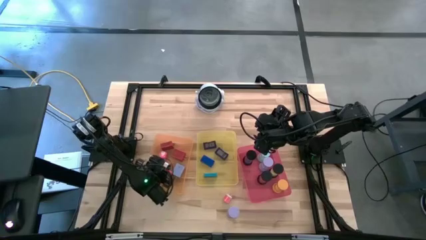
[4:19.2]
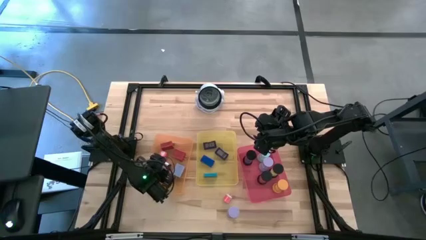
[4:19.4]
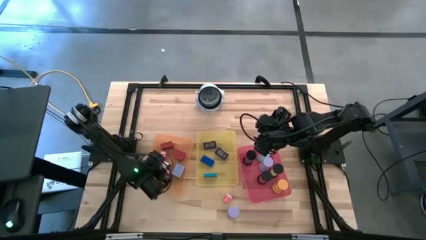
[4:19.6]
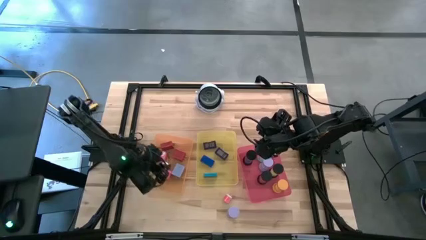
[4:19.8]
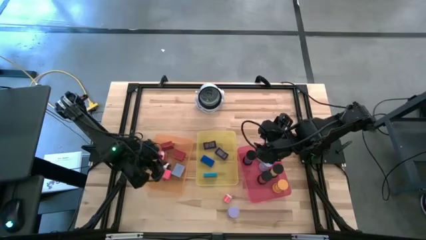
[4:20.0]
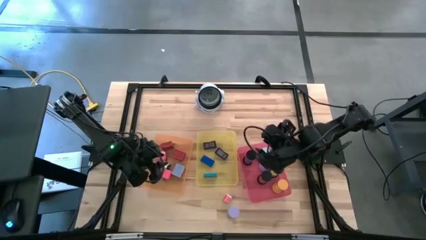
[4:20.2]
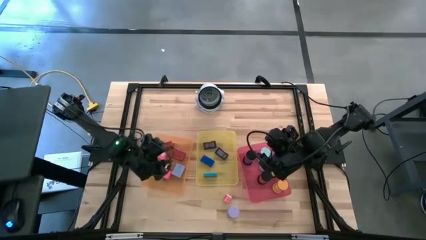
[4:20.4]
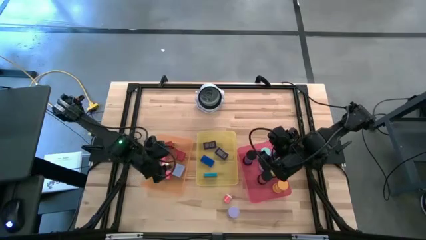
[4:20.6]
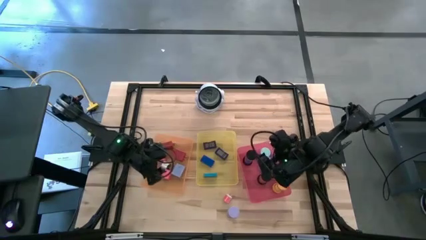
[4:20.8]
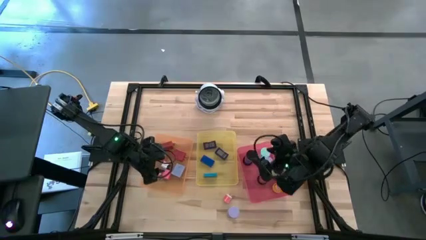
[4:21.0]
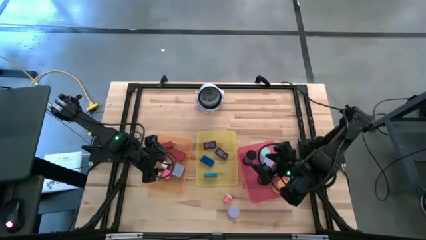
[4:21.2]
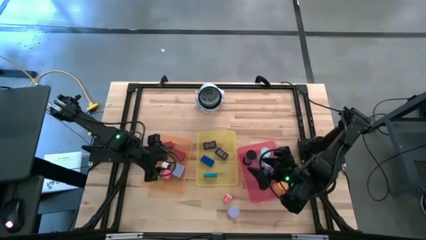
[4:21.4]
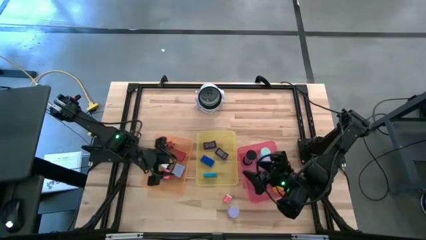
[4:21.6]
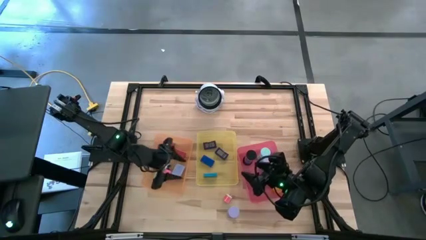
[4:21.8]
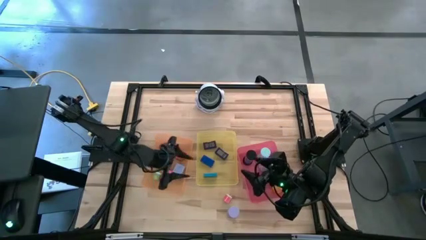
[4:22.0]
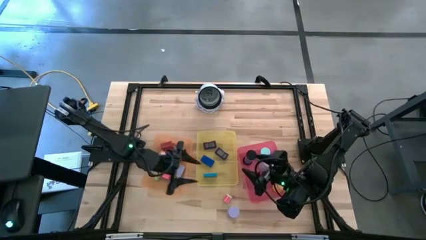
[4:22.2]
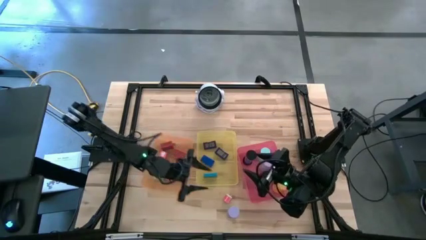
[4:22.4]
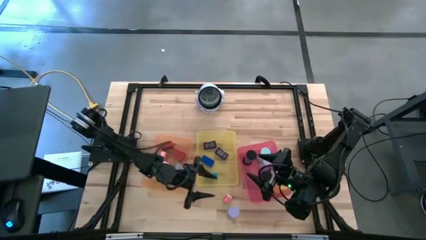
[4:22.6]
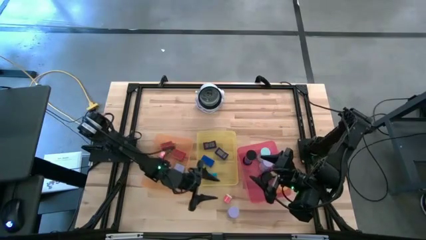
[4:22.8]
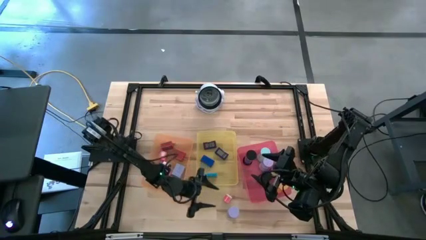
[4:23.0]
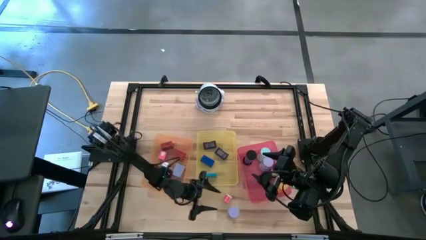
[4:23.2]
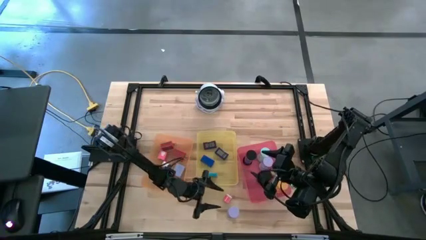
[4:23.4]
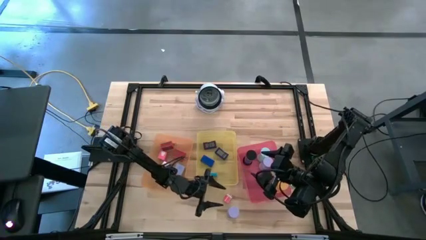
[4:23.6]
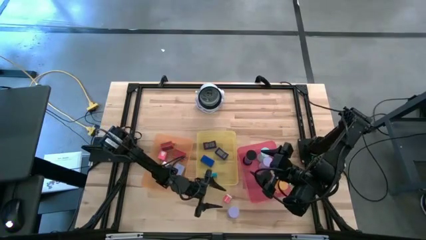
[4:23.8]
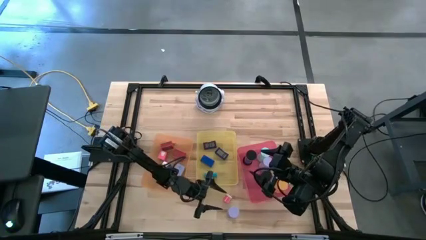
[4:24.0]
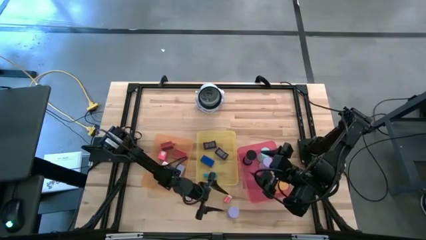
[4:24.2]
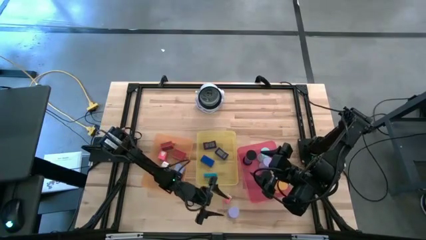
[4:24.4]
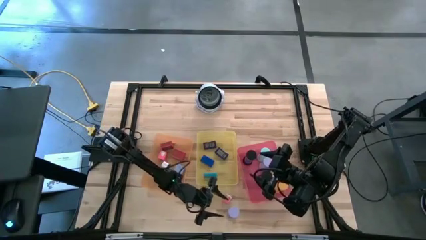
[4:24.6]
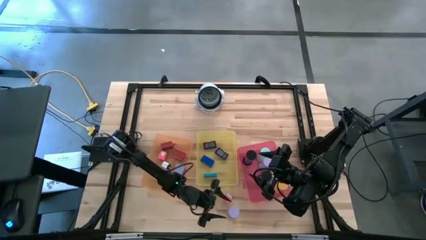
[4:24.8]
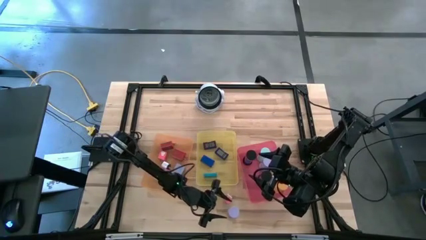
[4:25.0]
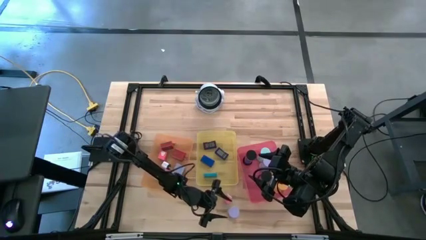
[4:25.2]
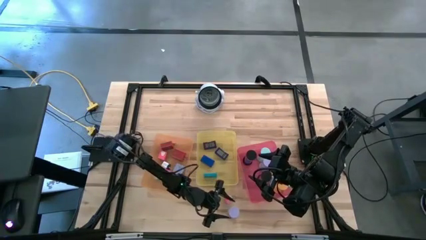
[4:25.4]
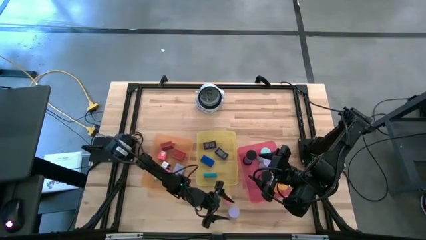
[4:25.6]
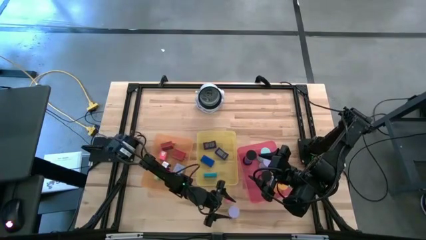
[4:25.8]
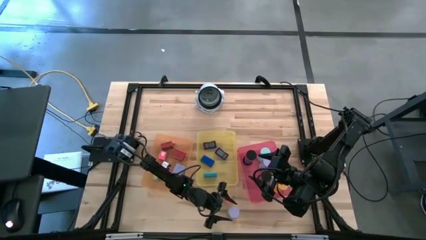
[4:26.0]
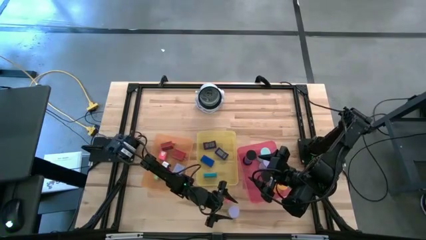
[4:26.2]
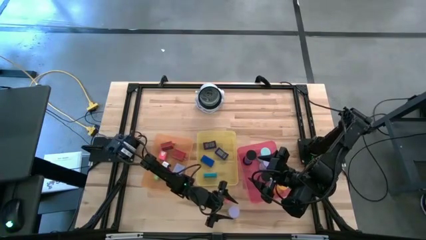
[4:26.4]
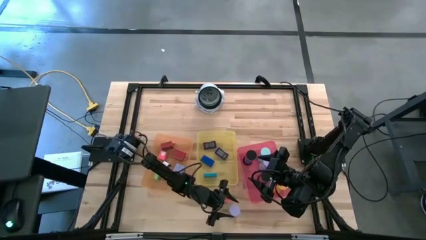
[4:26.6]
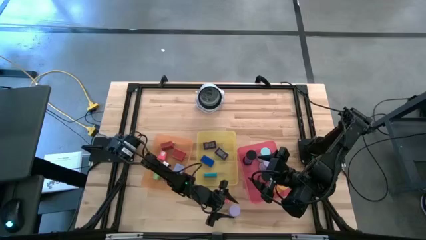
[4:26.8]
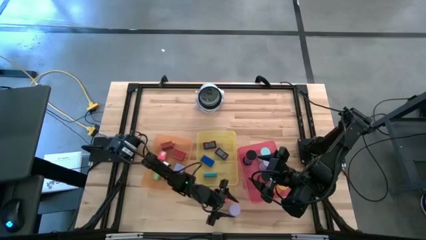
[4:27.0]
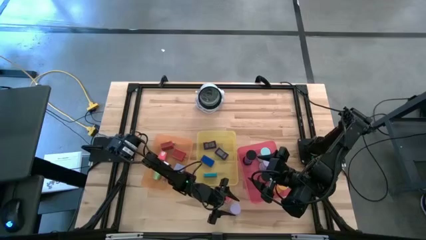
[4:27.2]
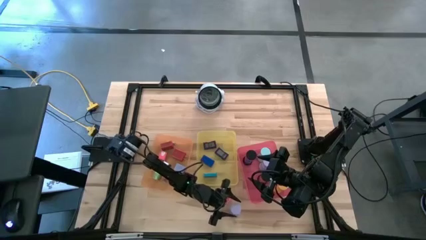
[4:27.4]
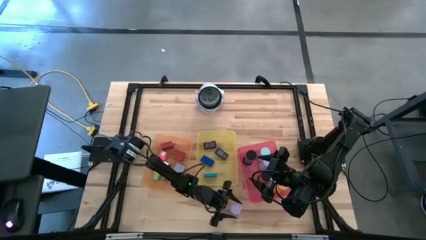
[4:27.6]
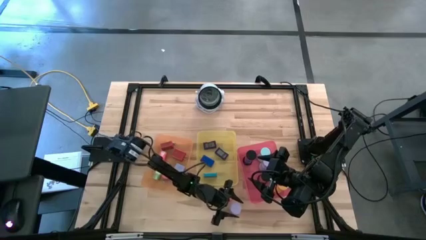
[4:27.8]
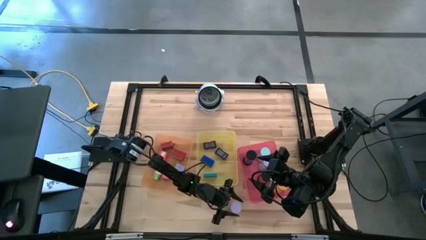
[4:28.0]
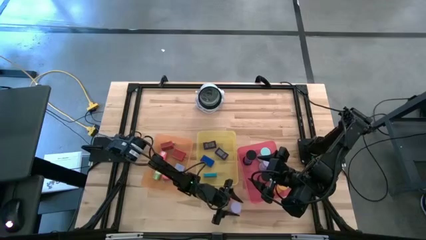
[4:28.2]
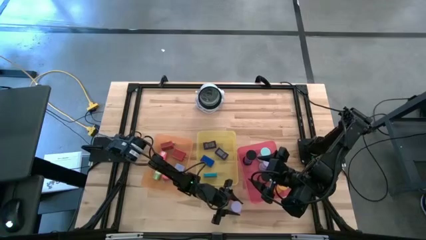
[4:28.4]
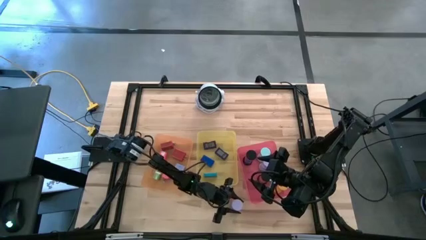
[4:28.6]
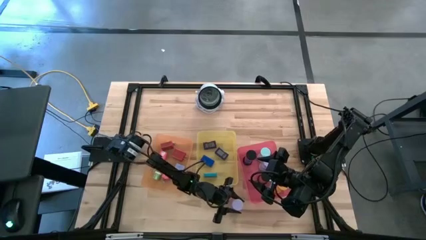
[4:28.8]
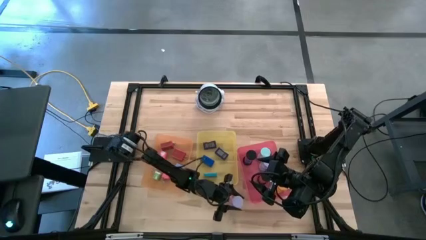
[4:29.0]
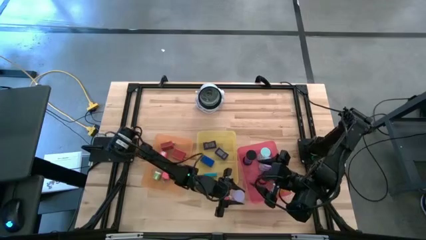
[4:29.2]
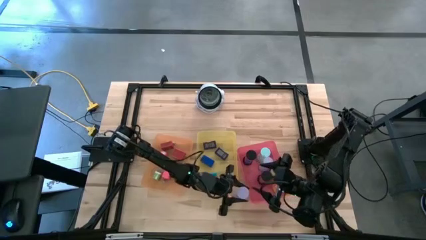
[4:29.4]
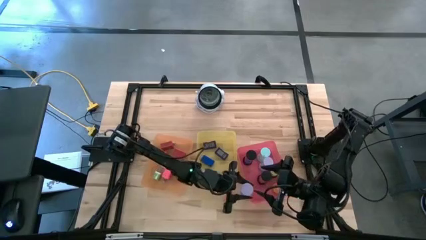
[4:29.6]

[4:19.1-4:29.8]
Task: Pick & Place Office items
Put the white hourglass timer into the red bin
